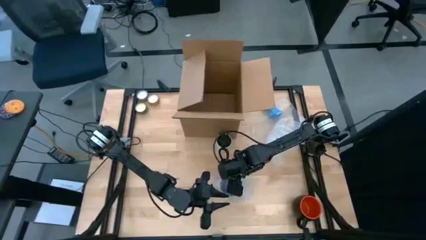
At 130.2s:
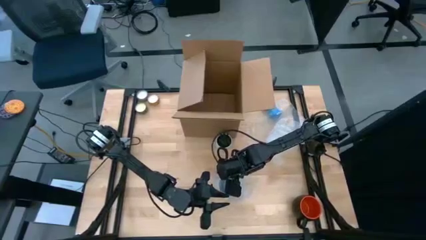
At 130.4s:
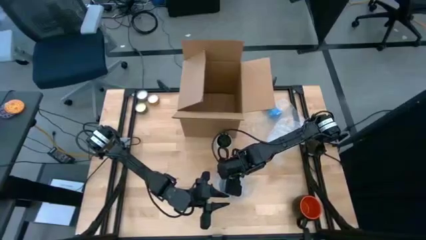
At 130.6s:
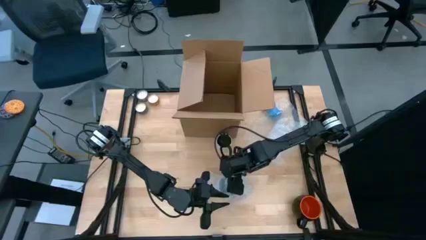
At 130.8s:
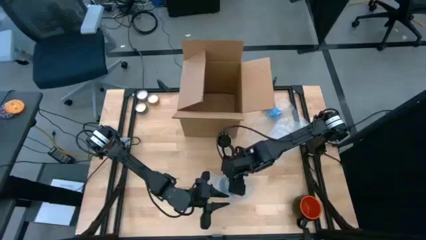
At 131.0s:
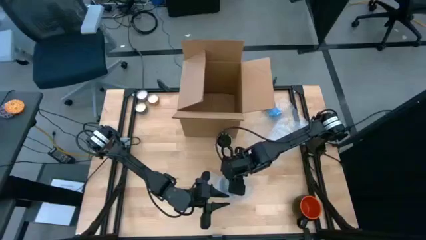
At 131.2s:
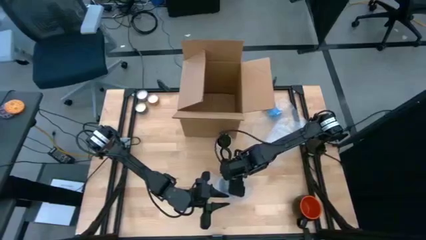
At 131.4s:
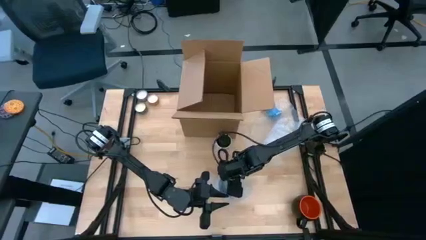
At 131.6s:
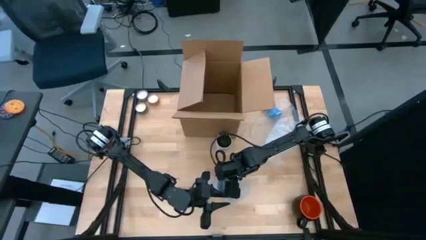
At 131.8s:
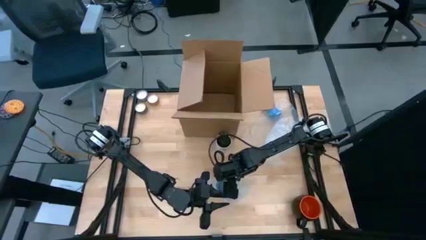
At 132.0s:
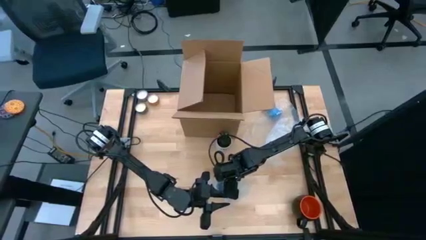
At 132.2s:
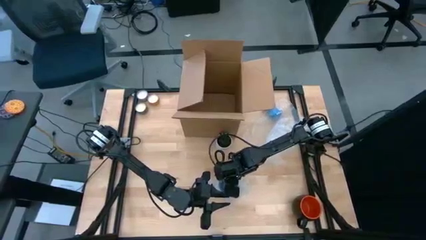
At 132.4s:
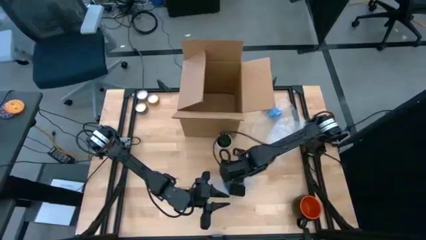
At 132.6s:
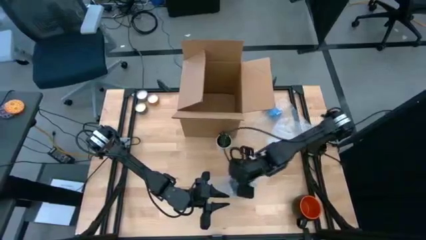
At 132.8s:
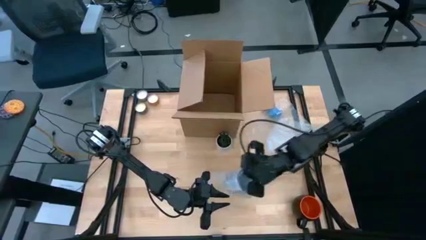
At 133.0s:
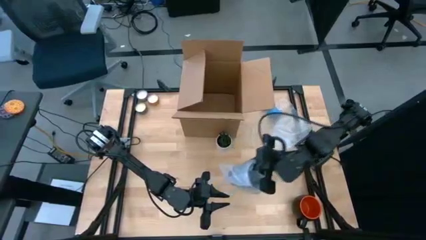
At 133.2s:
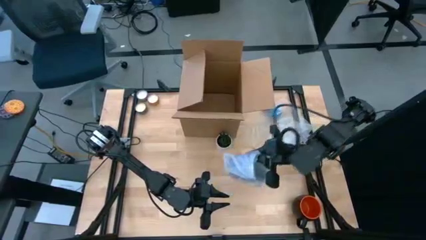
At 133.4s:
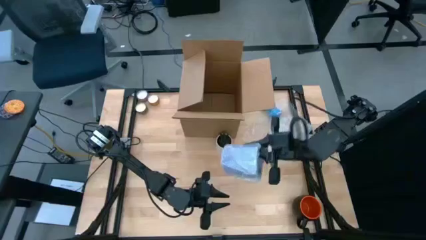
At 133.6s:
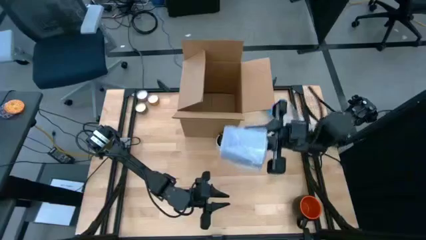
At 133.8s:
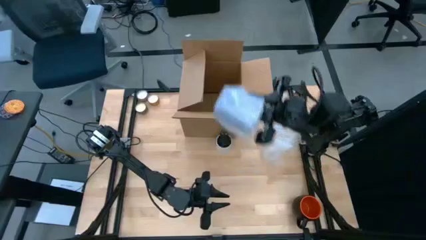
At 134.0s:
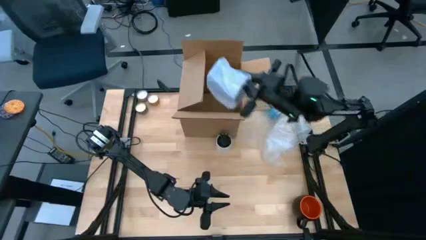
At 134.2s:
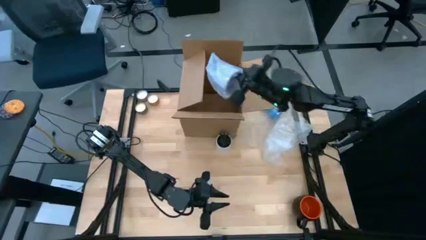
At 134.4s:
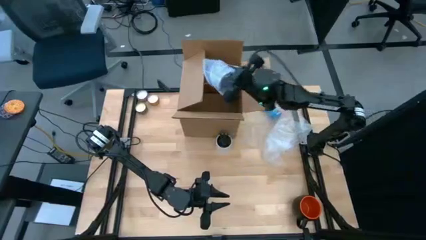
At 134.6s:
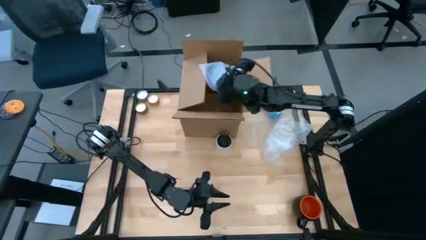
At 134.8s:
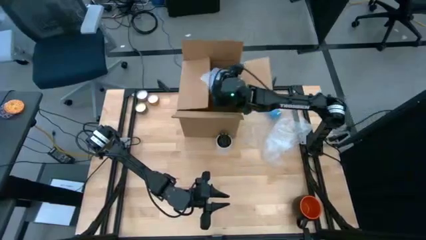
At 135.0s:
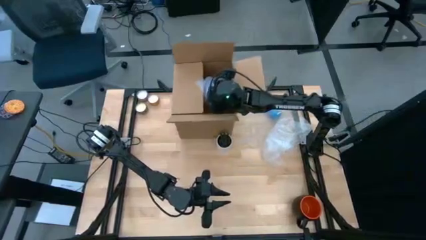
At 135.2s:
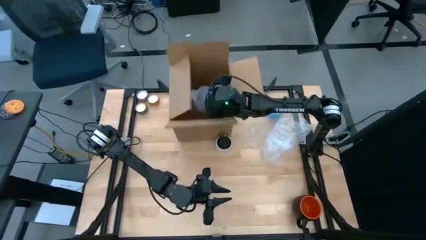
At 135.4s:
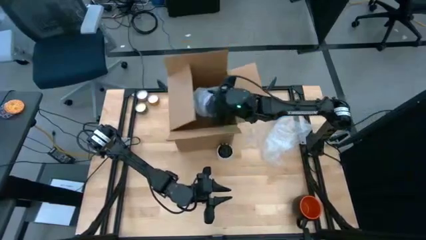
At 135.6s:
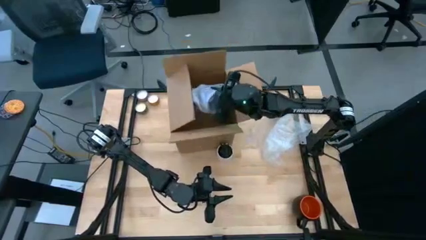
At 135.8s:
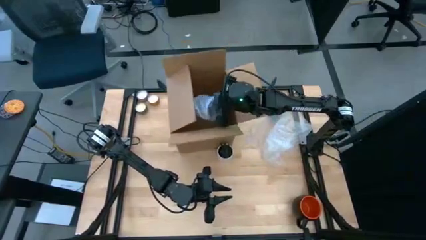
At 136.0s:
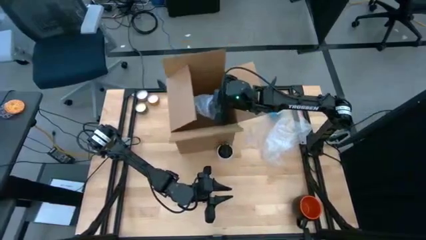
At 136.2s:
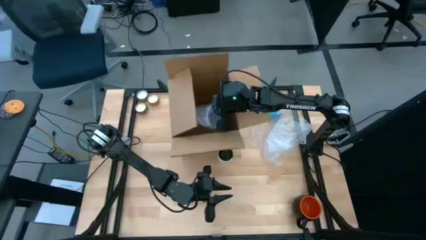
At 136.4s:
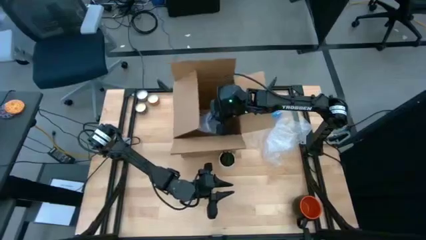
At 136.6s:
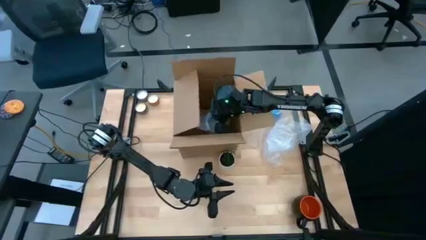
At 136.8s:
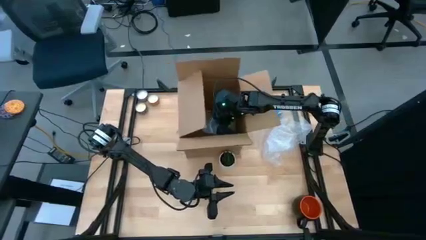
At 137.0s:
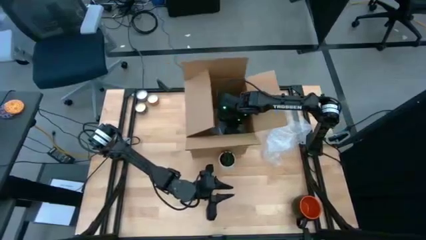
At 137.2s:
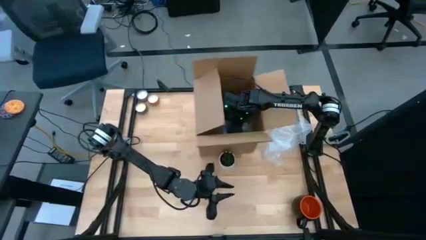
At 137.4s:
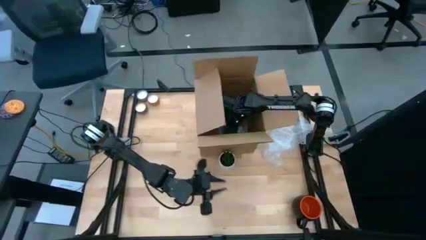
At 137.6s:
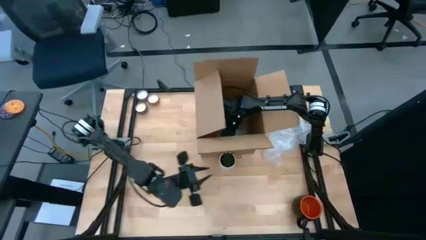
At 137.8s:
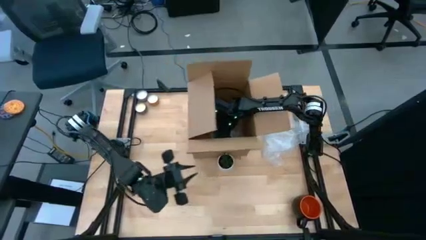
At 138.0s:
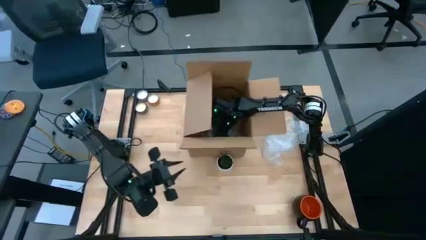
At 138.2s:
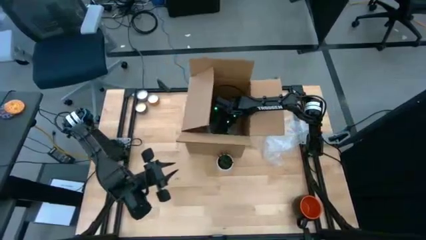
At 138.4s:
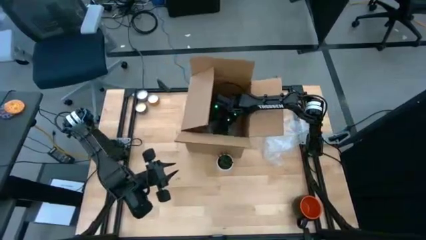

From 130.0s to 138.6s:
Task: wrap mug
Put the wrapped blue cup into the cardboard box

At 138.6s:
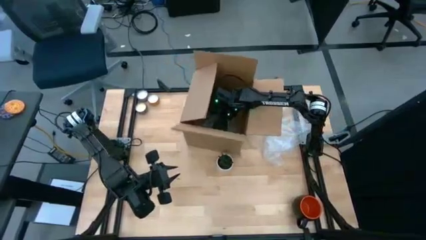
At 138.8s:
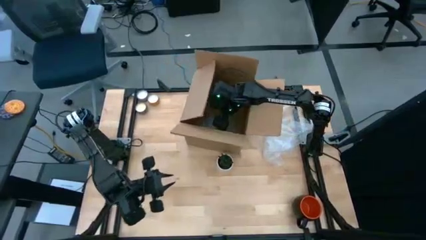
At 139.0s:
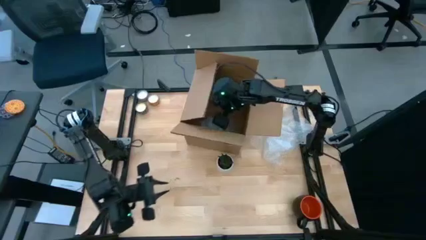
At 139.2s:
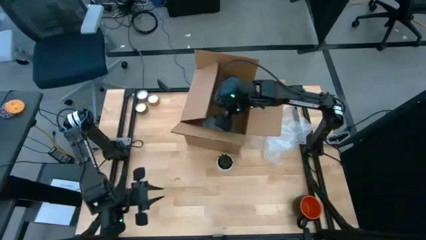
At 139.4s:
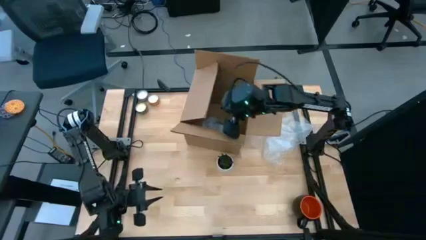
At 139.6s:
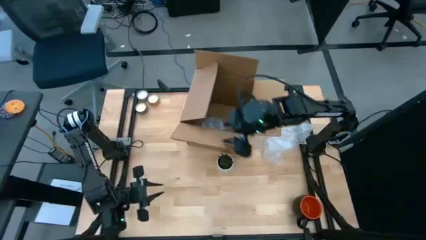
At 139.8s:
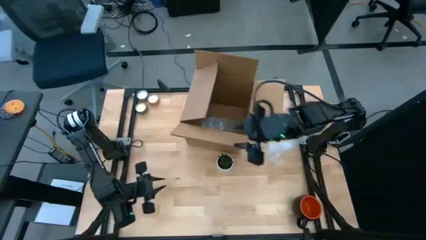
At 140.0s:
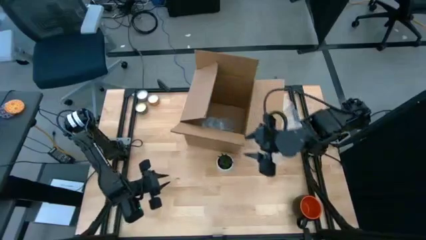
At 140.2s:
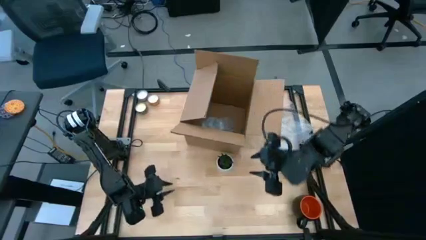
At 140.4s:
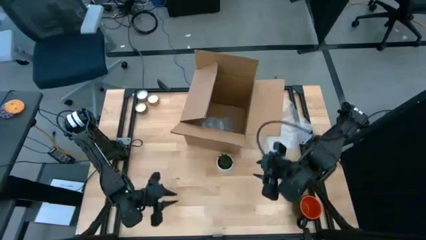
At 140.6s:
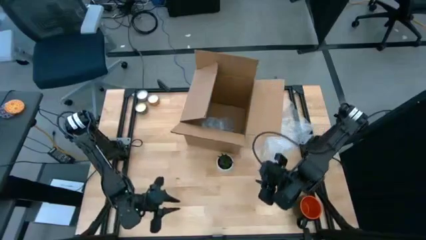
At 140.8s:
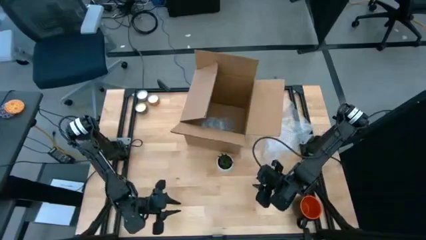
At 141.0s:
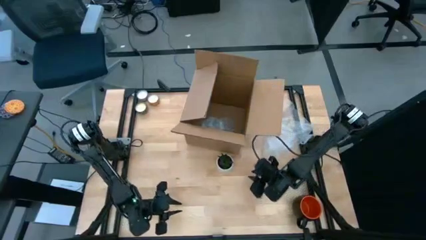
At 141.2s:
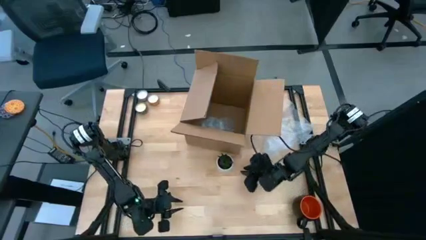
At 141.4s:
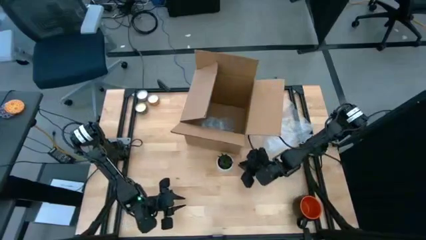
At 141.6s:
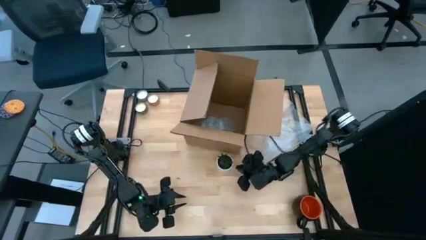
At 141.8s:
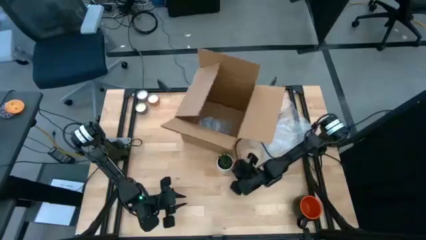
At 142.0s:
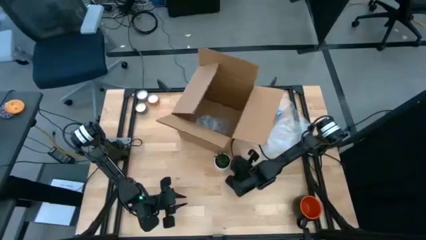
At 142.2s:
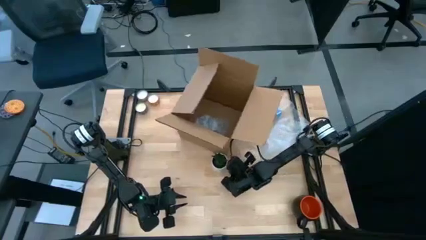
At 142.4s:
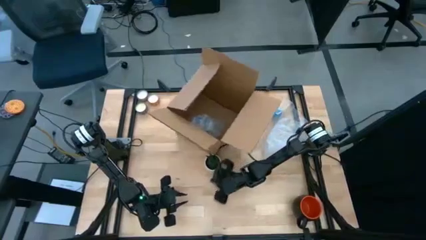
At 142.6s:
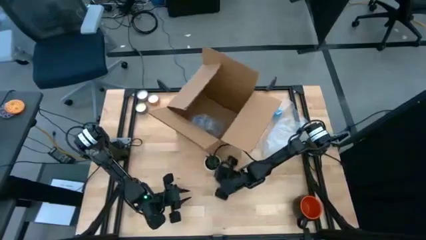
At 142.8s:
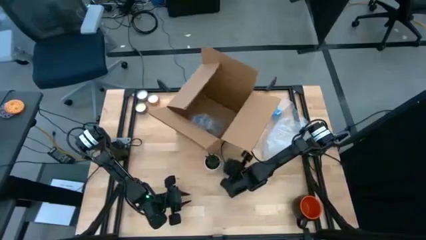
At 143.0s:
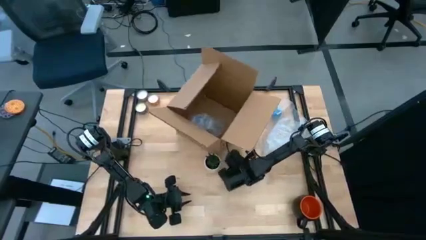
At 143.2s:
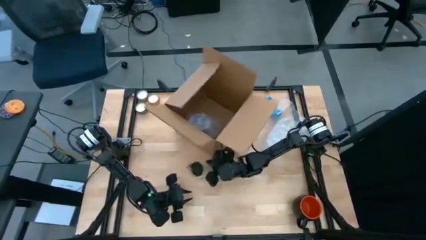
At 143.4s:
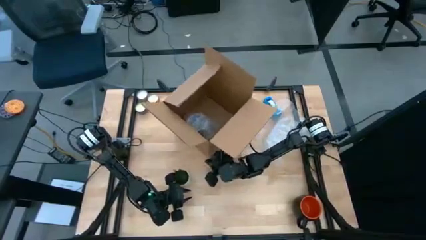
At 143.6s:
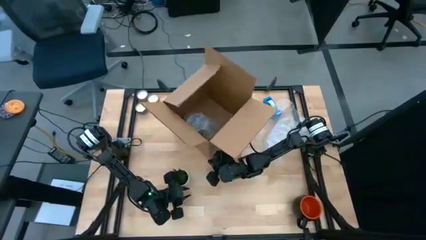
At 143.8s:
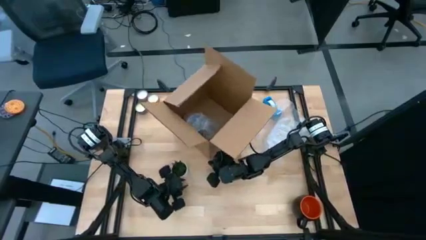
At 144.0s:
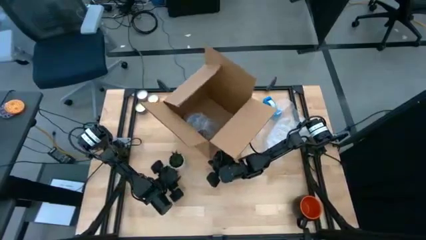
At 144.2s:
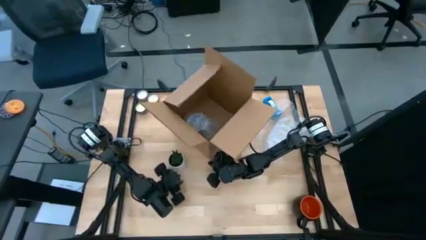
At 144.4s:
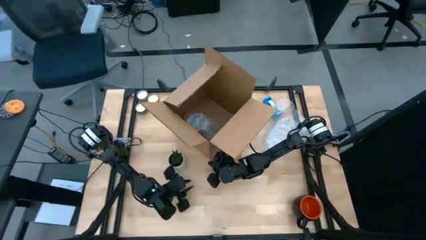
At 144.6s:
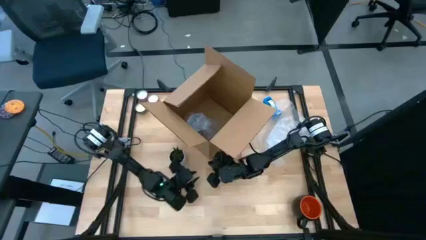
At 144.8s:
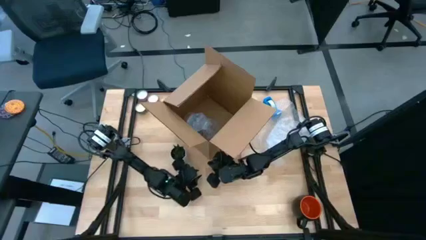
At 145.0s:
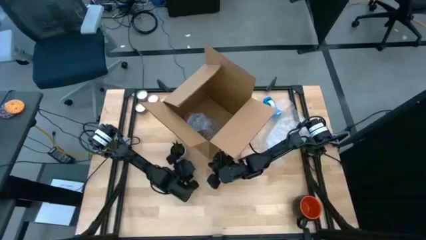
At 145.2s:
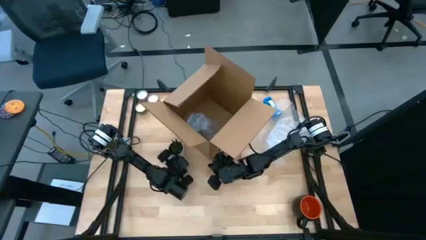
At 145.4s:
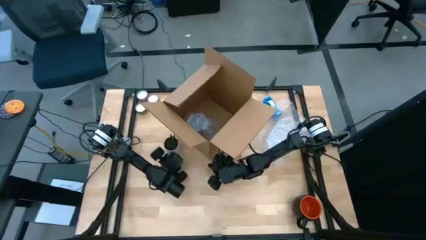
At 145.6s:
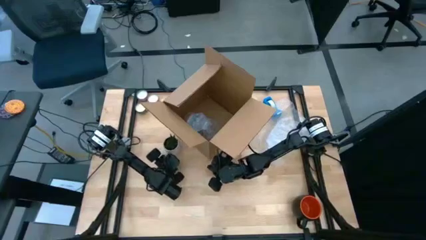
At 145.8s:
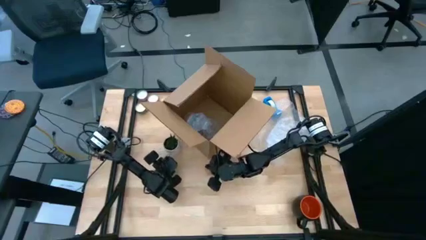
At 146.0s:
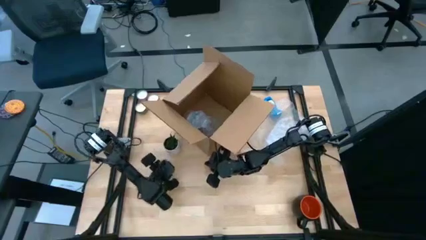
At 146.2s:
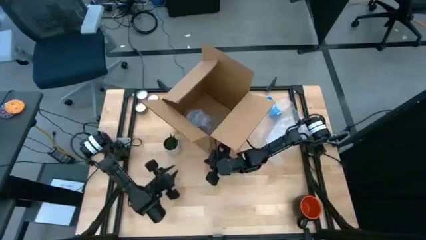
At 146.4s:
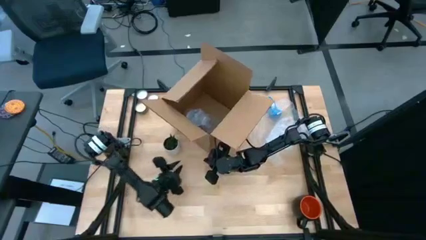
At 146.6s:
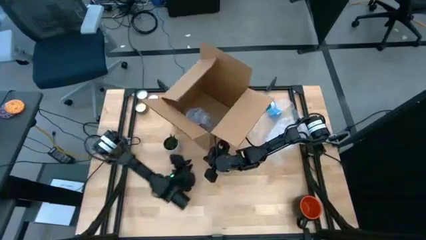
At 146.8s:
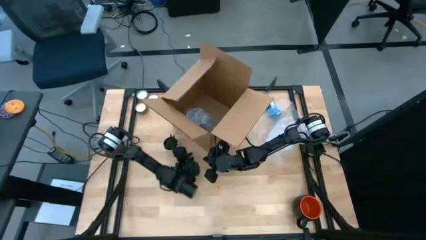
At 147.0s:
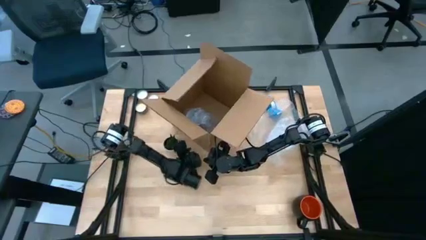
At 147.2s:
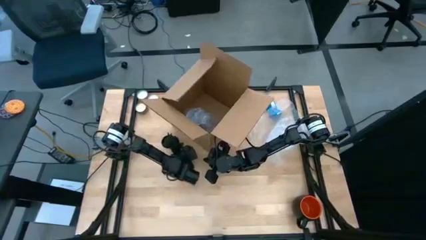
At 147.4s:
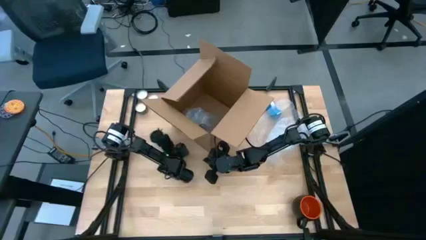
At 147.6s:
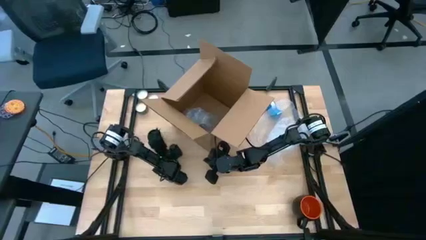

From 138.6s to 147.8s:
Move the potted plant to the top left of the table
